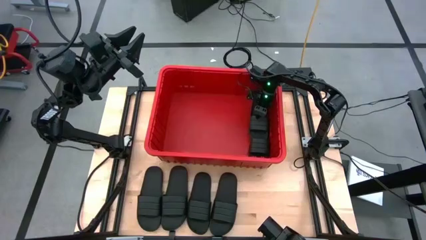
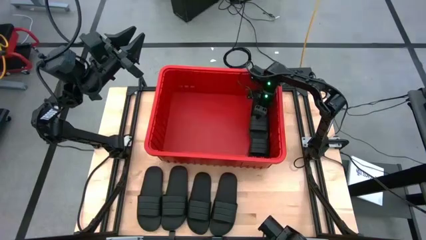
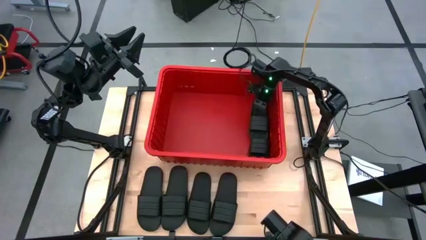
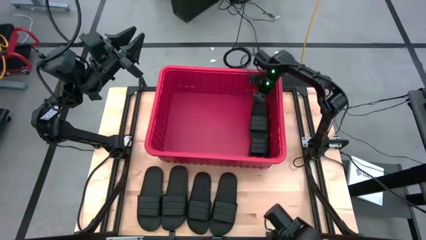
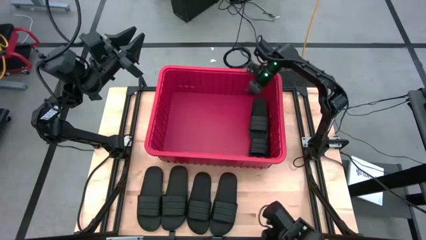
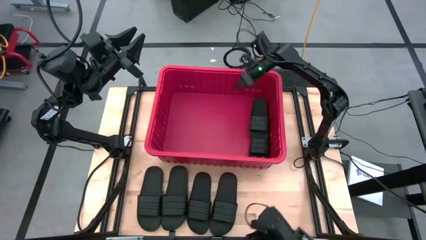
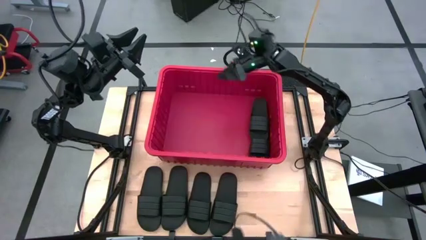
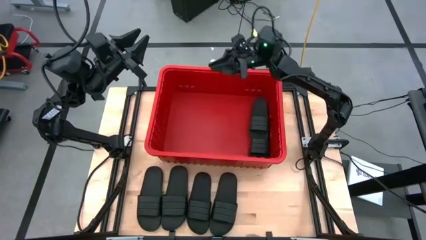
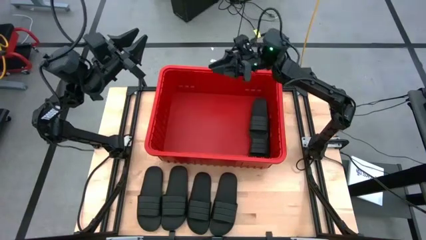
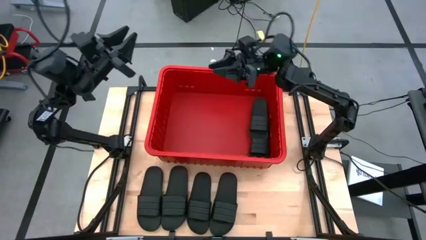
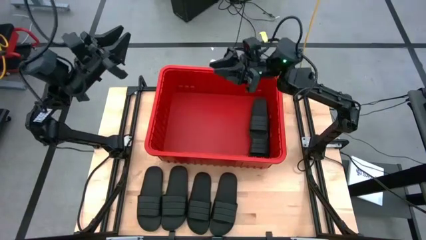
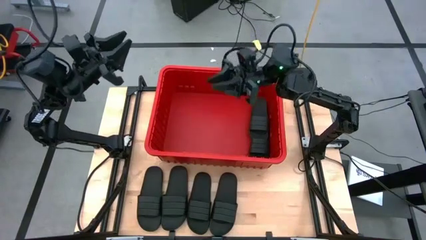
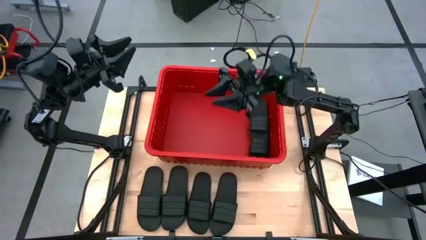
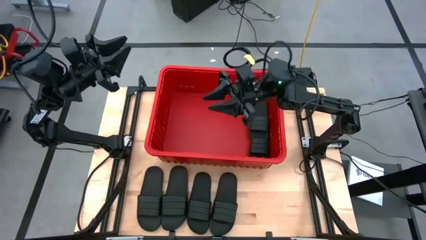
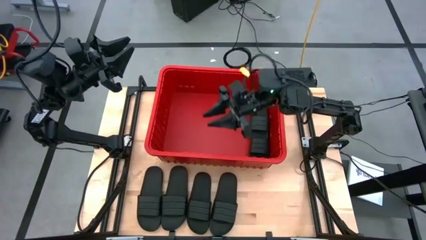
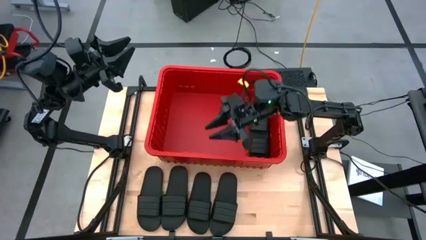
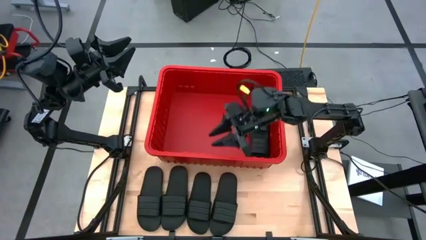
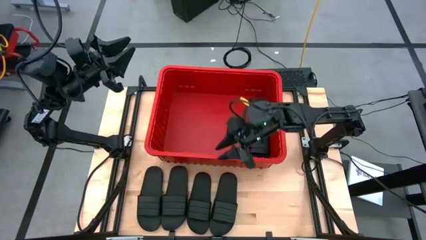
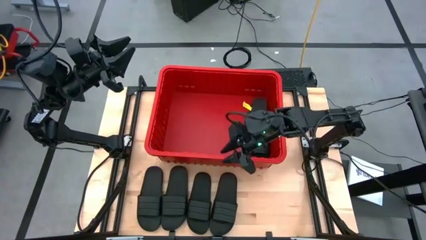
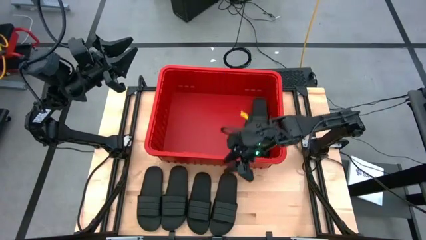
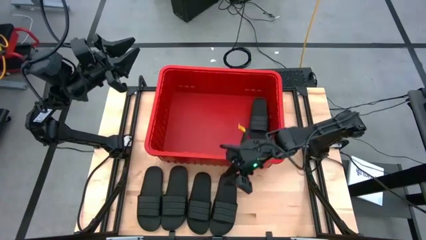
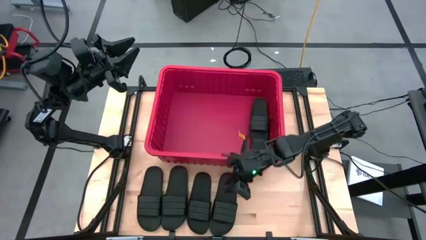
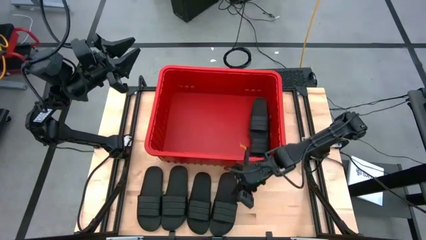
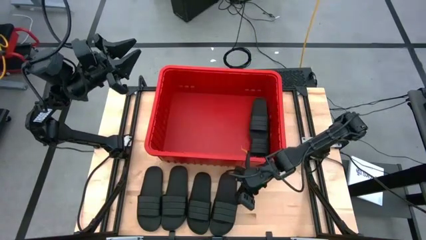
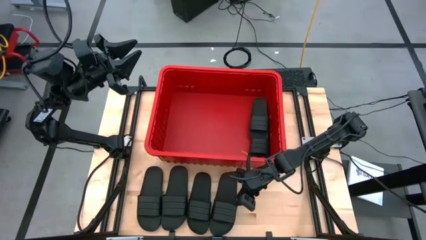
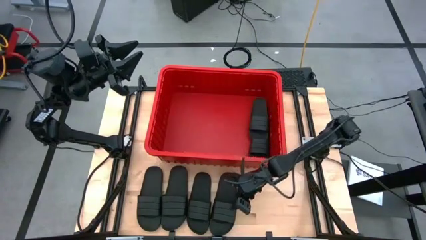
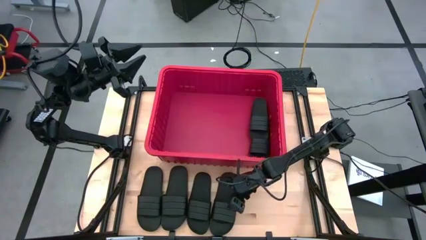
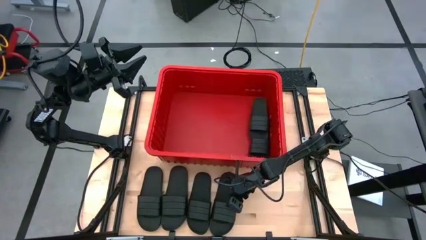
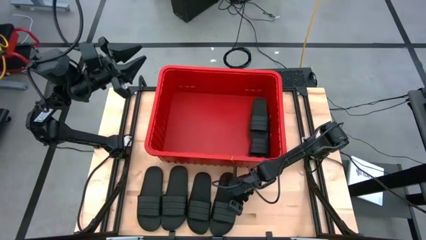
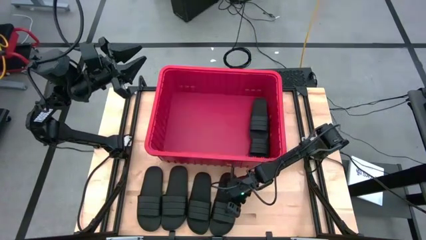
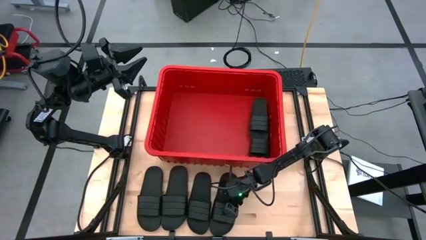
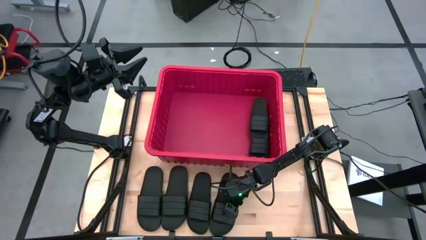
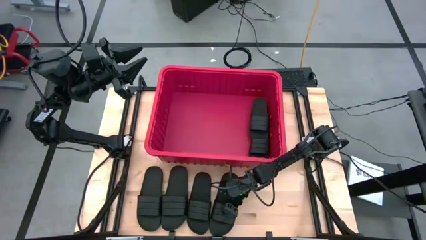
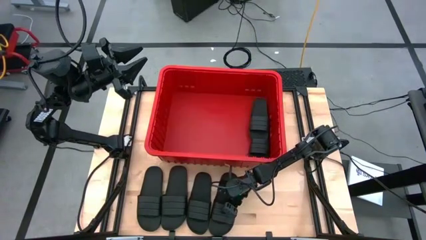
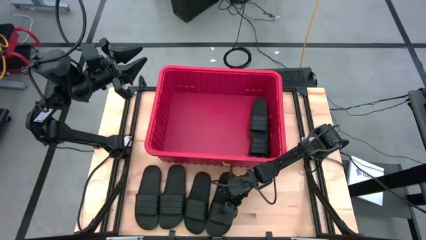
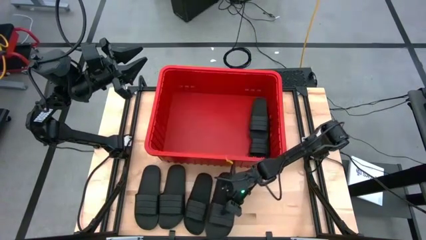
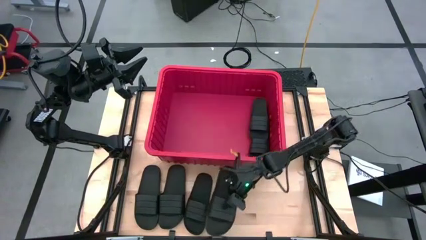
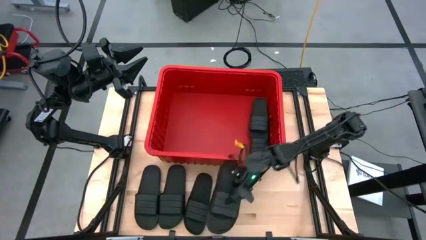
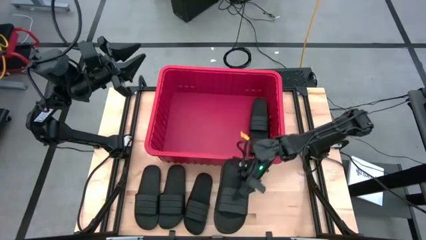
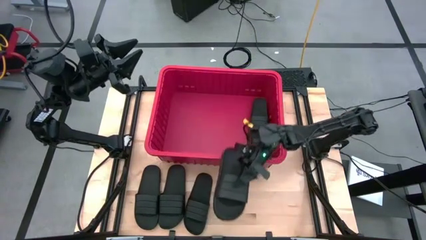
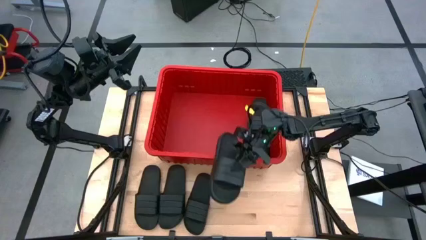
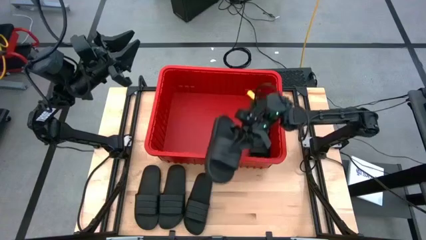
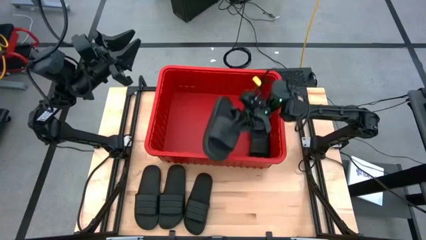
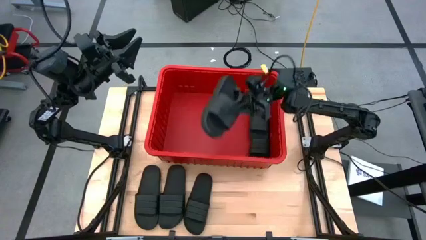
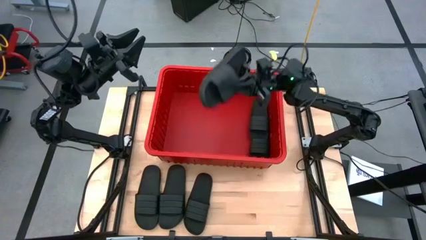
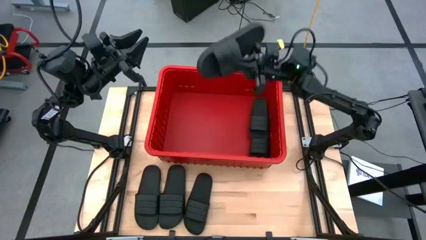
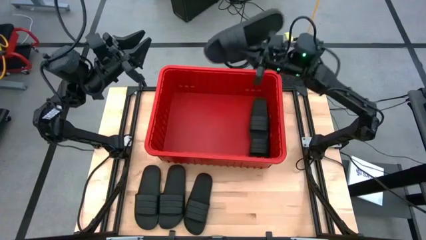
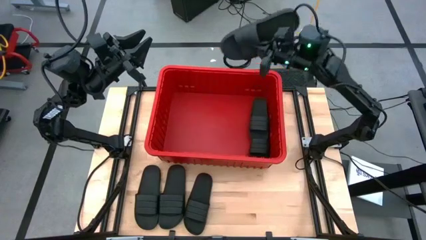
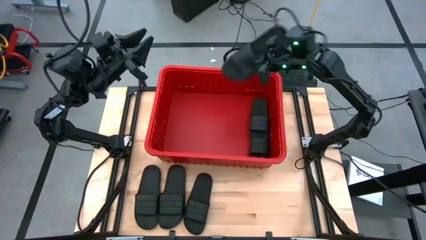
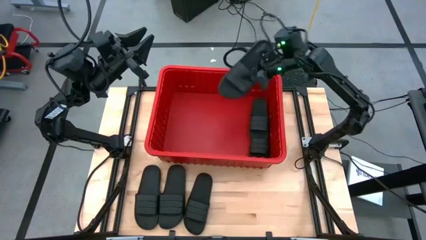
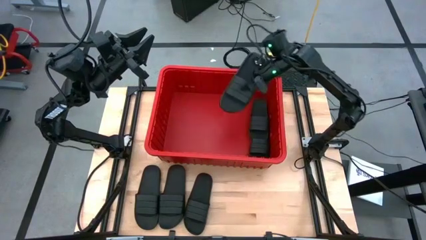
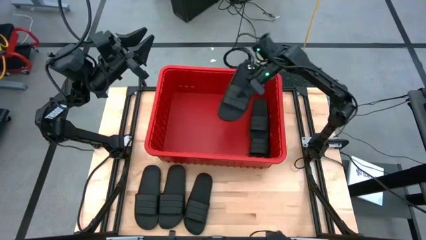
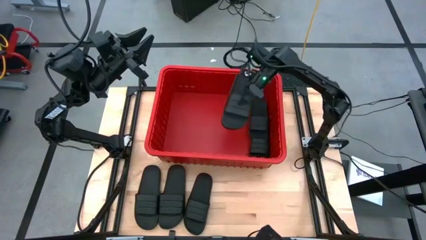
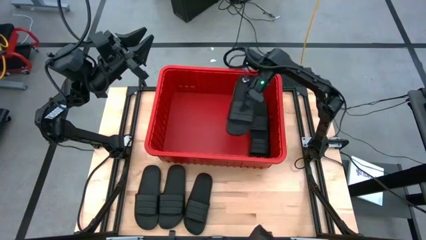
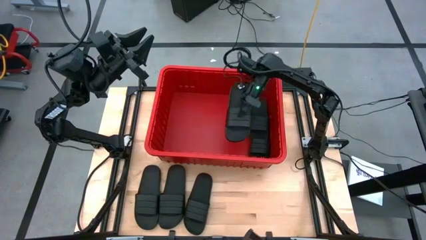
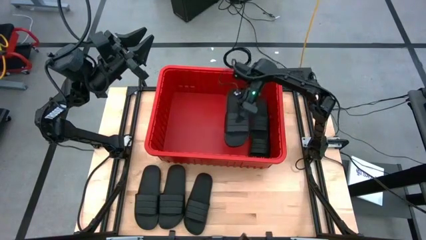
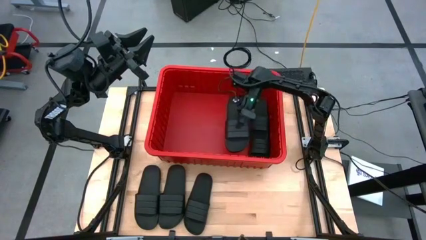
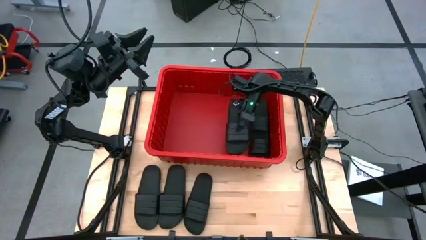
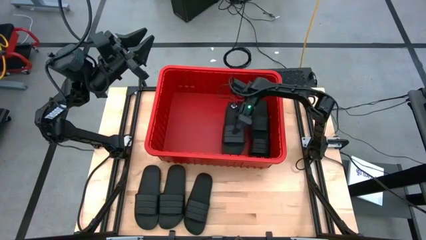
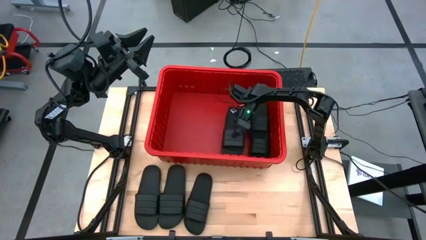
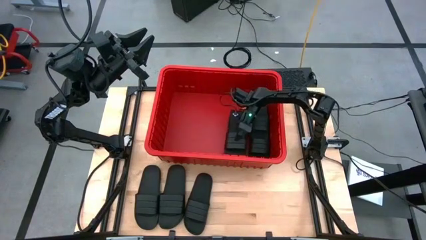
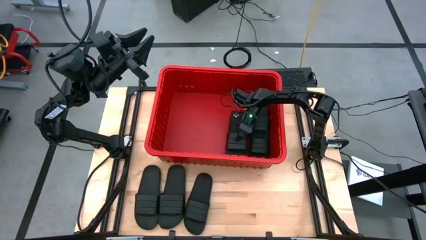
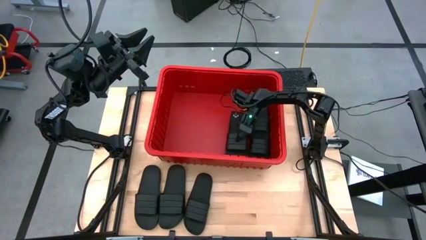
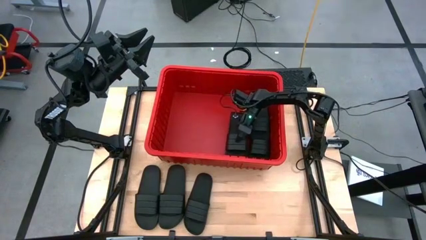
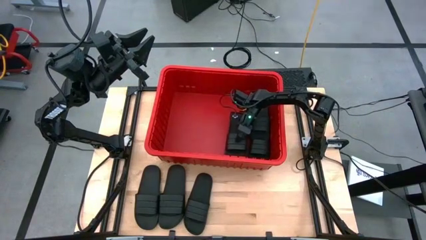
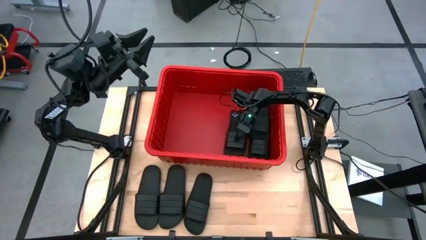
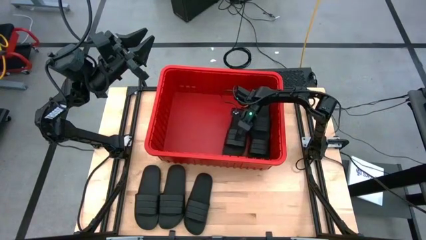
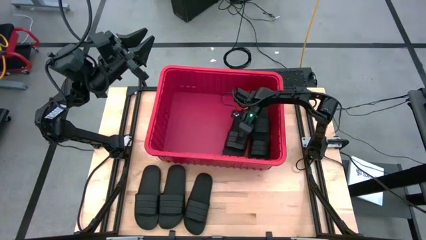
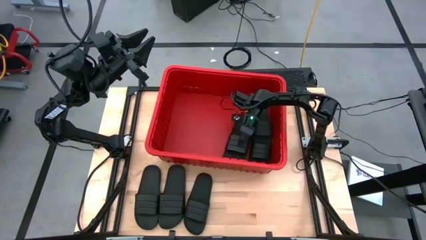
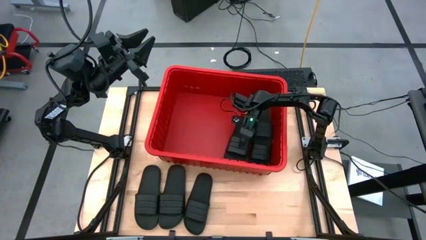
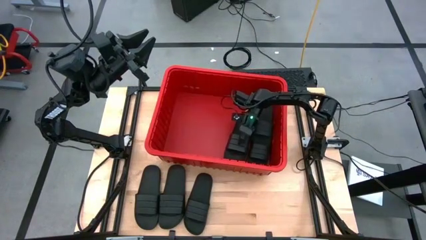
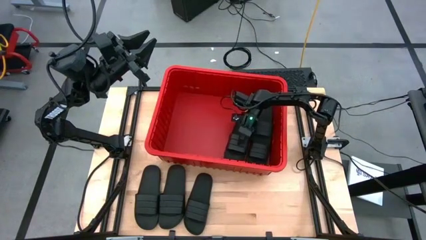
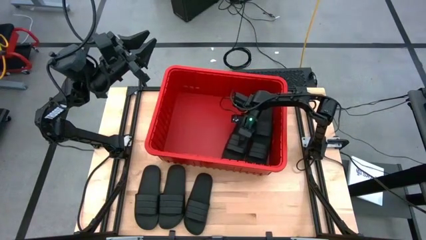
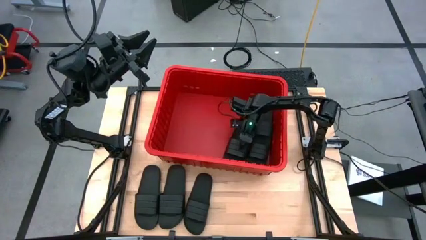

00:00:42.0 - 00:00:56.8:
Task: Pick and place slides into bin
Put the black slide into the red bin

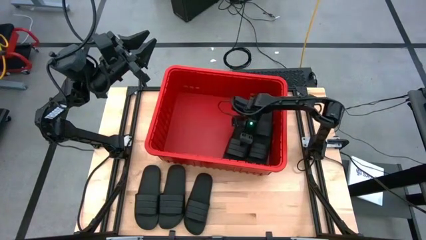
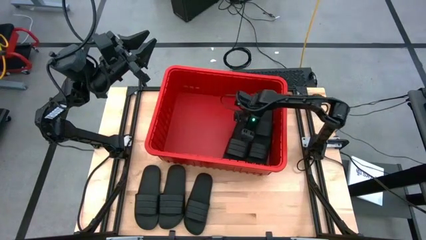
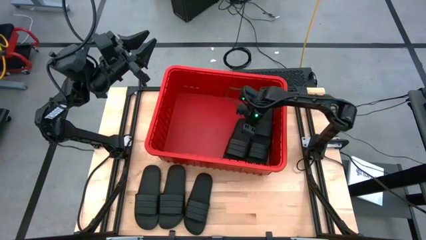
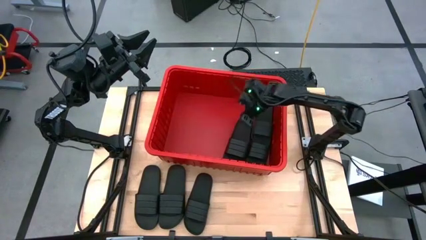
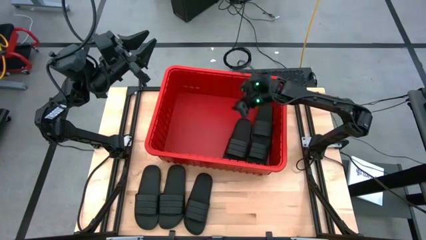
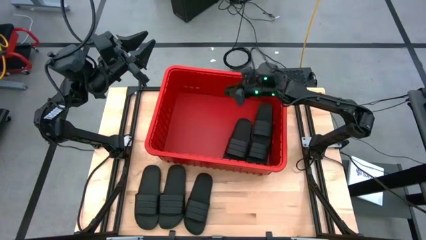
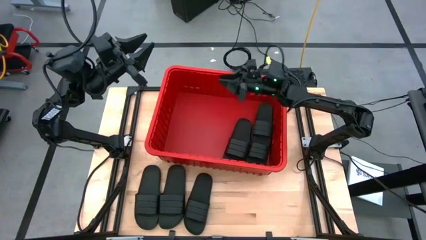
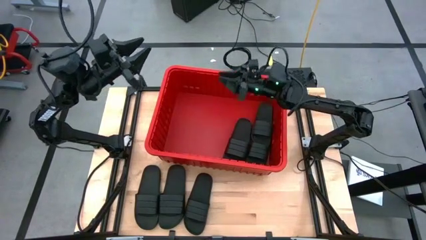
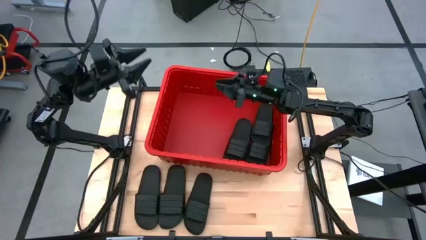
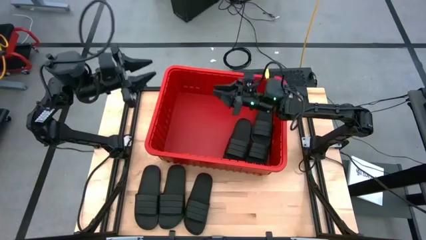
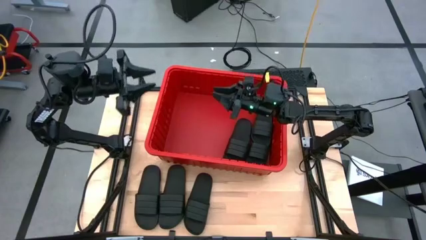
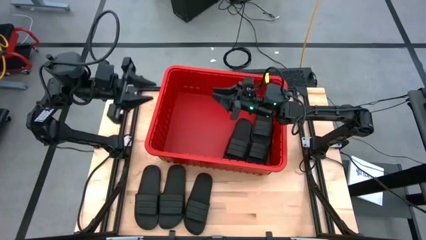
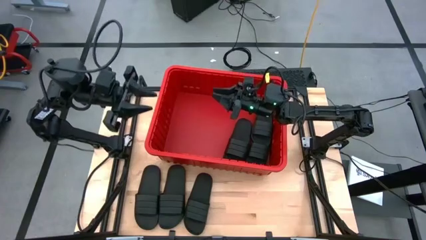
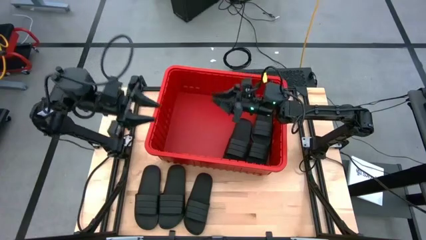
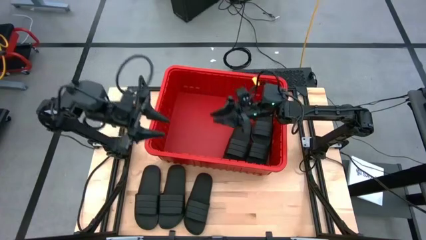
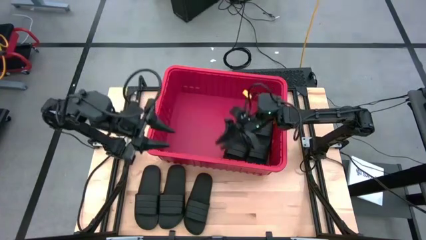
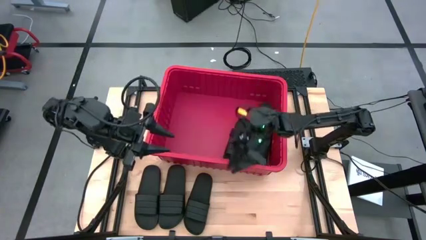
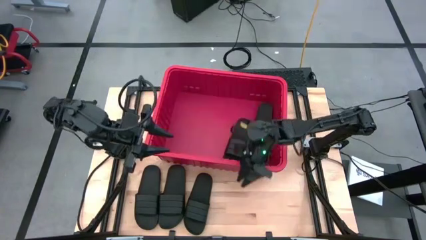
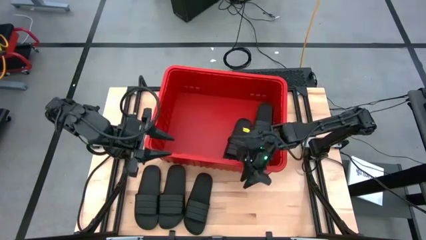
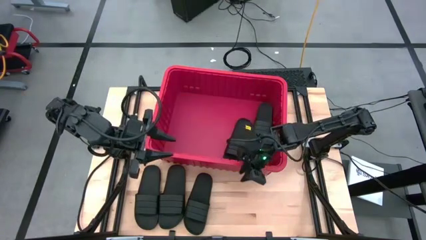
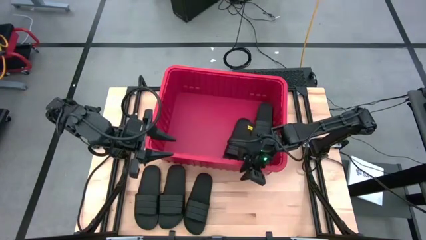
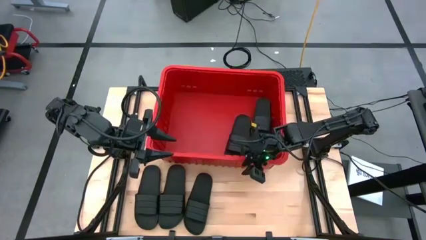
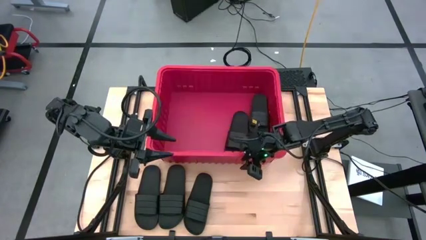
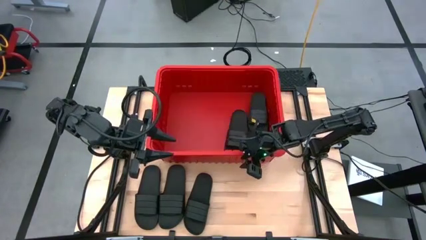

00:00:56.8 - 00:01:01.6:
Adjust the red bin
